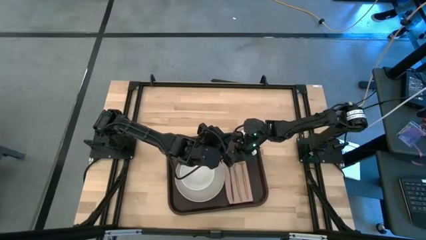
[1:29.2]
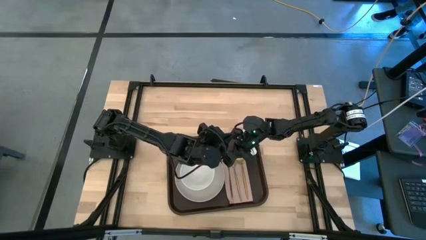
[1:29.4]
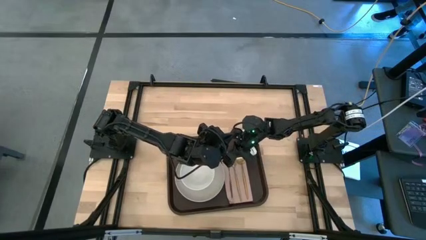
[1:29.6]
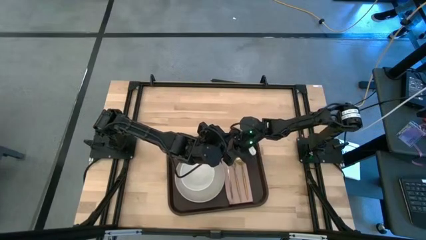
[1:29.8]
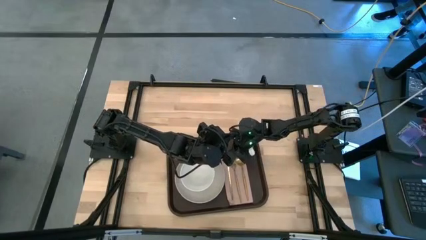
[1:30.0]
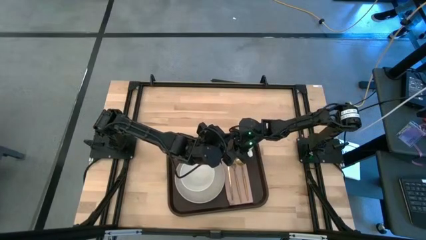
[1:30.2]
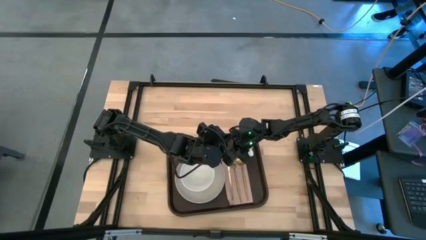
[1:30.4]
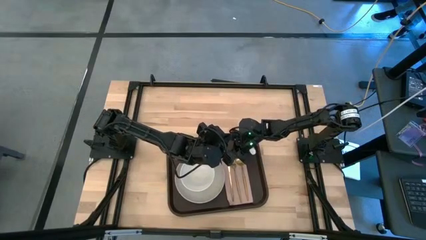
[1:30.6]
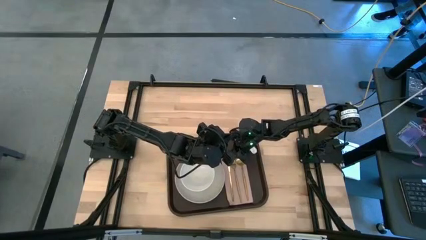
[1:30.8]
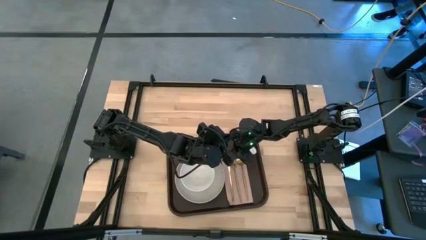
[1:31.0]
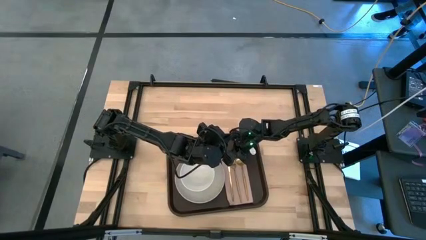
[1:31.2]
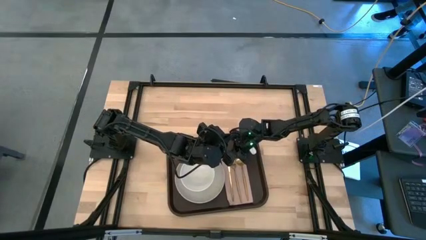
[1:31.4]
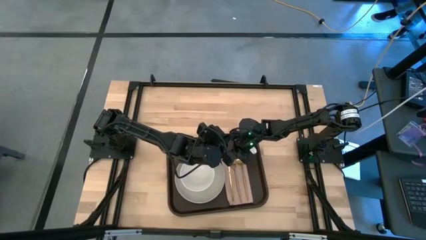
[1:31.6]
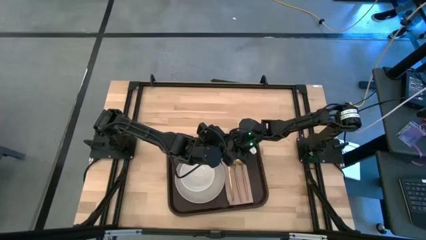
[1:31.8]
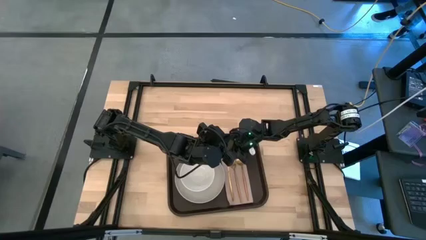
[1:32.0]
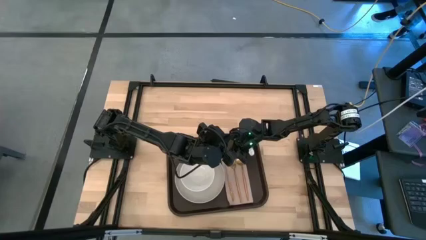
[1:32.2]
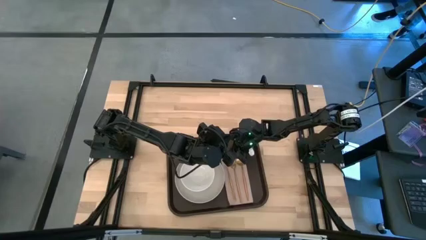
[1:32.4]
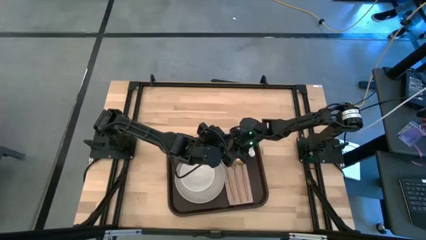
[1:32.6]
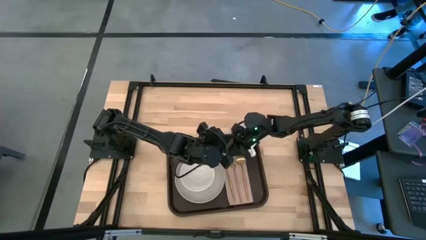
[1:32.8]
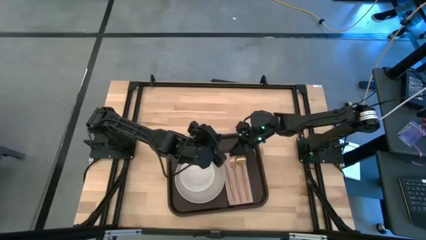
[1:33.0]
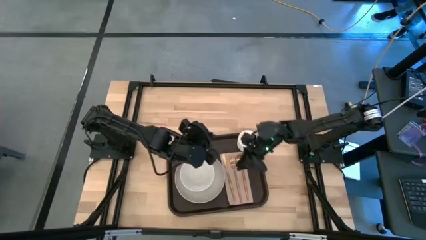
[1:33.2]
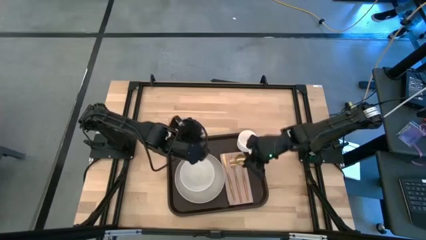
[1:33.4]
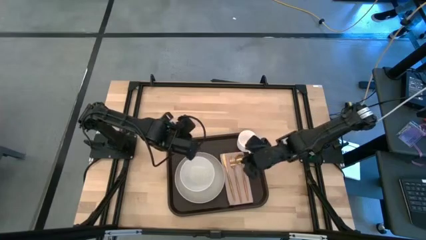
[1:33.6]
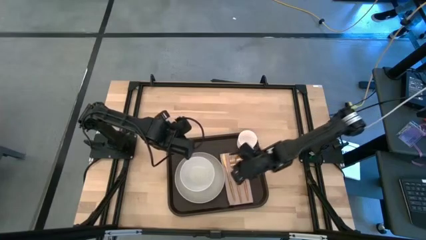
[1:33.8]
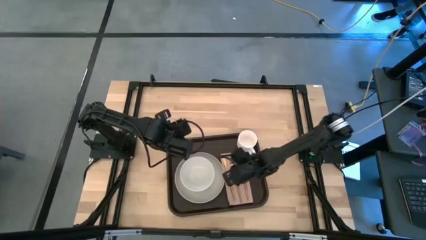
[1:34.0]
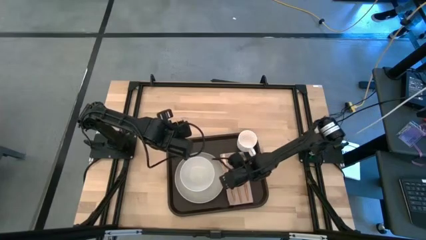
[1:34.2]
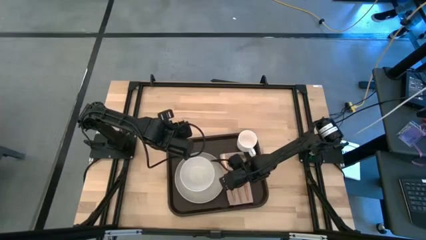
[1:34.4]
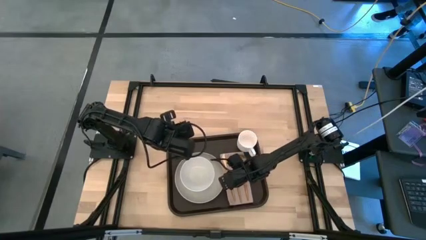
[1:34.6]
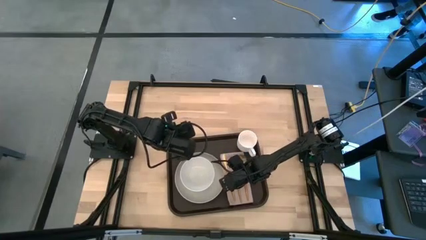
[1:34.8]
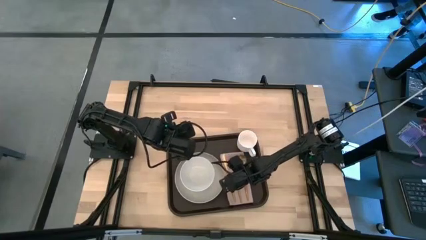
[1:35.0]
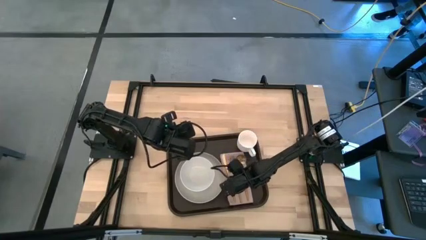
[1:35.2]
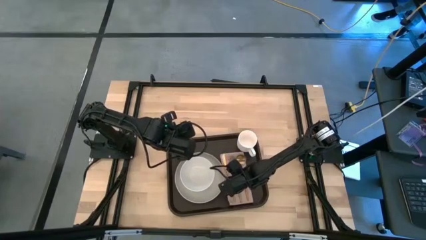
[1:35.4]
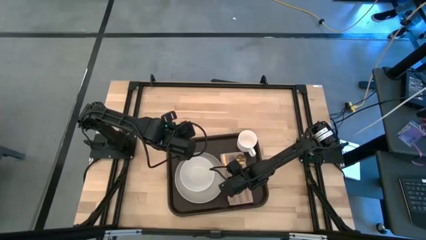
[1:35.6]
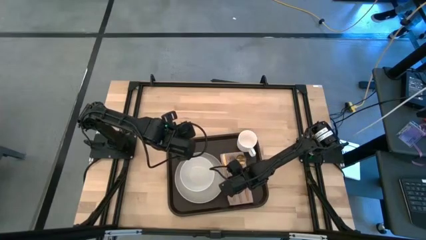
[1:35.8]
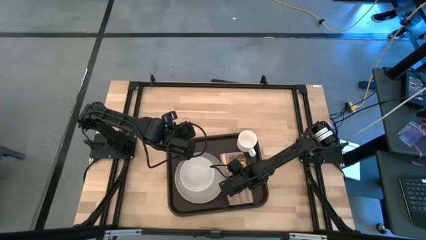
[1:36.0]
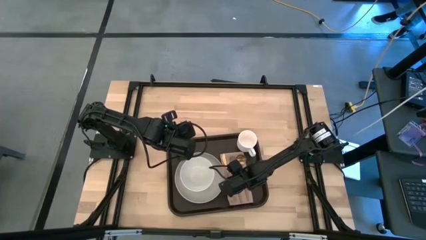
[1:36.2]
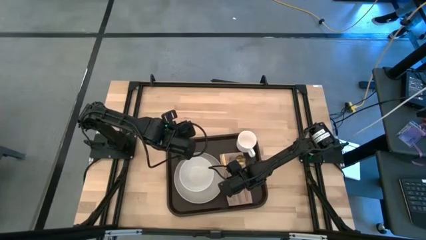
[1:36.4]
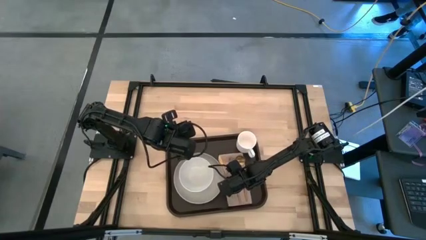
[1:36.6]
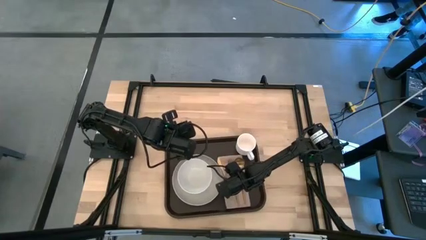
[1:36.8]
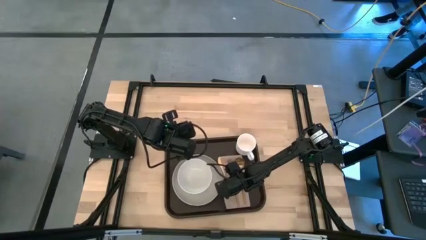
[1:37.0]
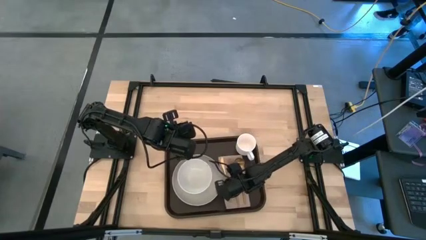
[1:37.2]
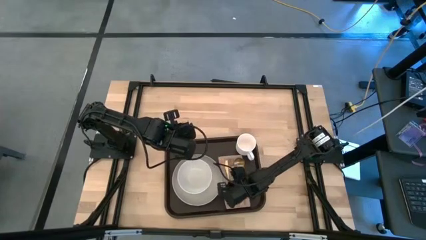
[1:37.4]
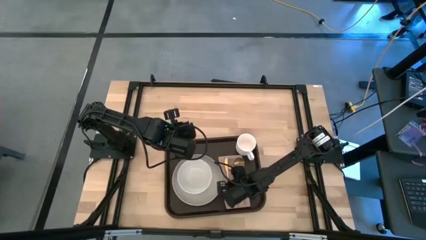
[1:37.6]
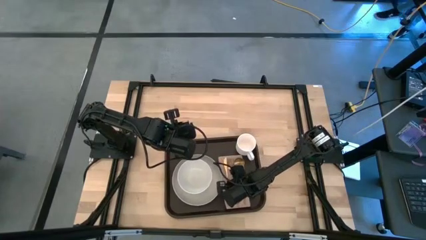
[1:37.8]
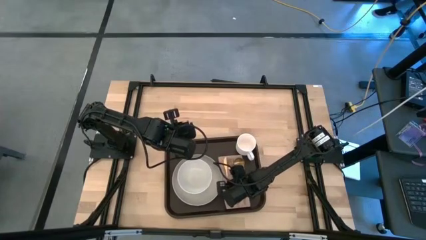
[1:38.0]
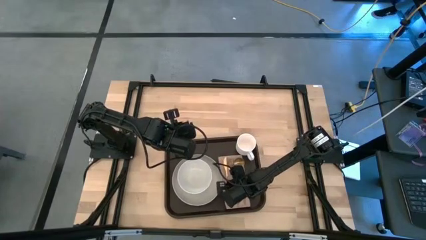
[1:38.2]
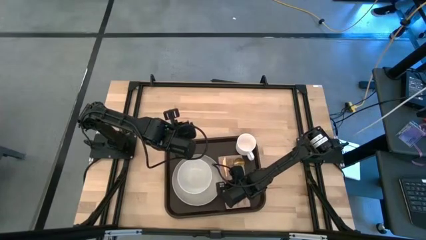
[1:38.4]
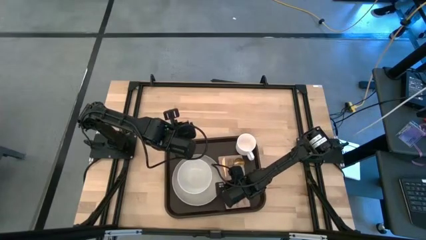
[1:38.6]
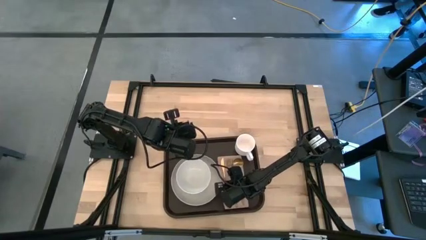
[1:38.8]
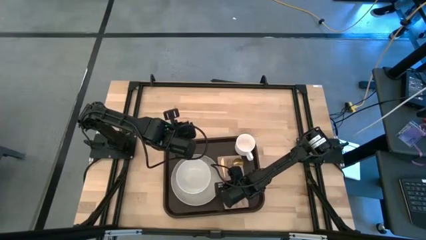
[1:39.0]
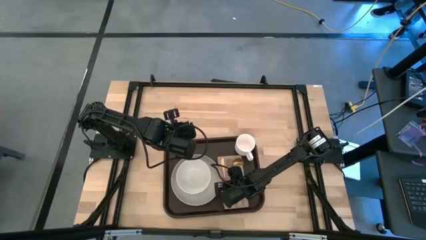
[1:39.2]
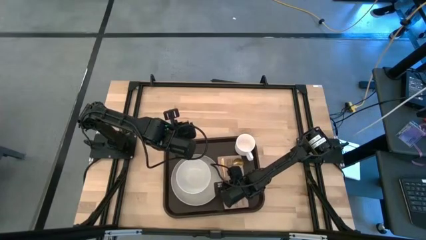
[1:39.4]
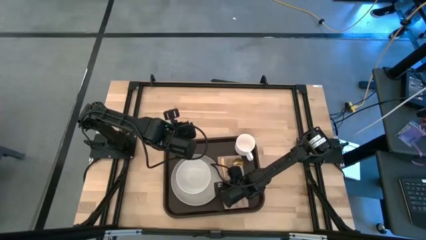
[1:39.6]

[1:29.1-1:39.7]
Task: Set up tray
Put the golden knife to the left of the golden fork on the brown serving tray

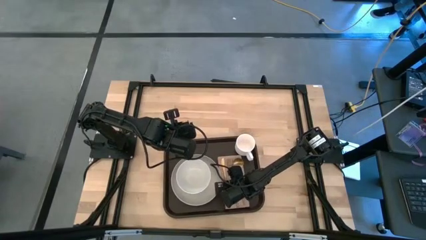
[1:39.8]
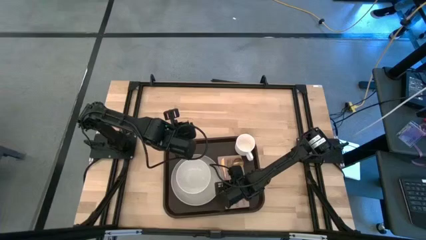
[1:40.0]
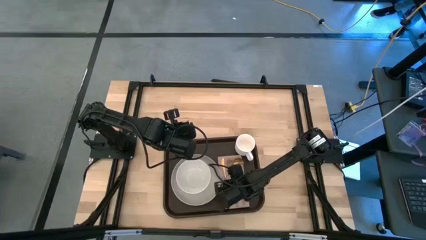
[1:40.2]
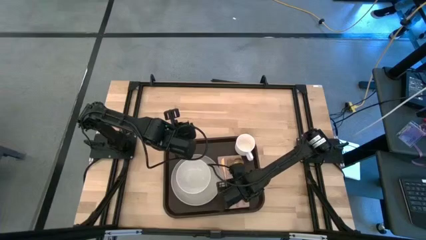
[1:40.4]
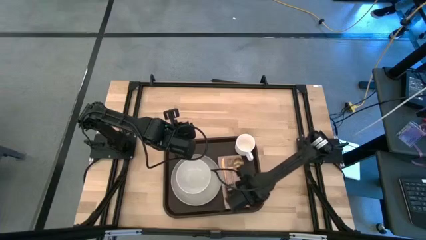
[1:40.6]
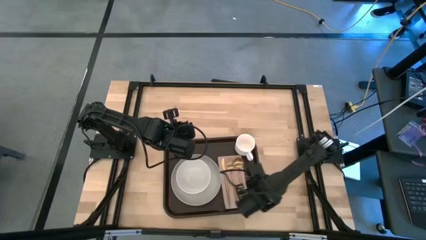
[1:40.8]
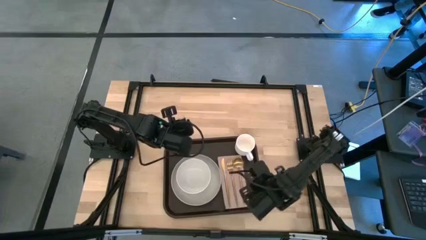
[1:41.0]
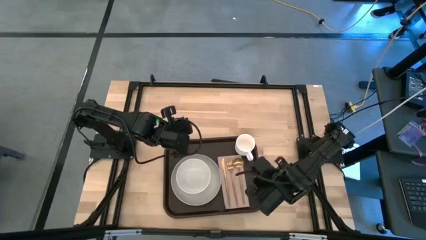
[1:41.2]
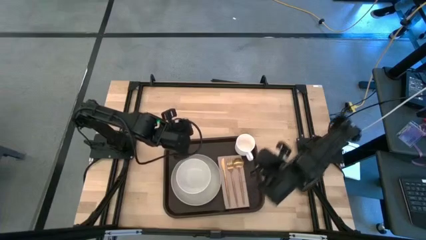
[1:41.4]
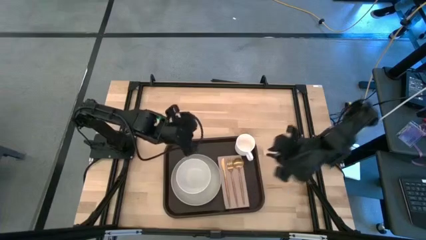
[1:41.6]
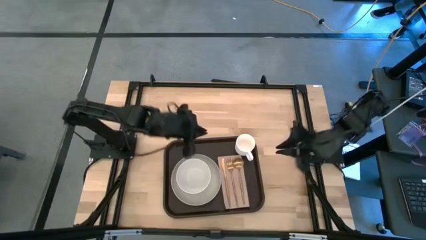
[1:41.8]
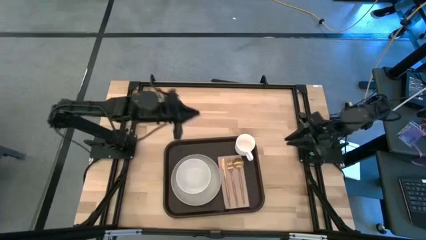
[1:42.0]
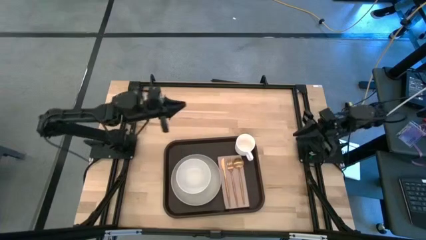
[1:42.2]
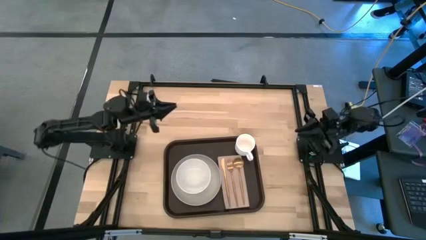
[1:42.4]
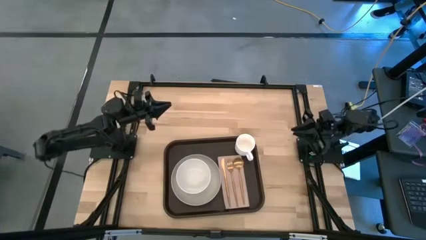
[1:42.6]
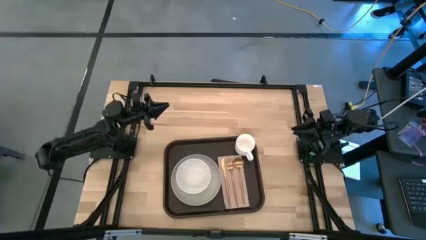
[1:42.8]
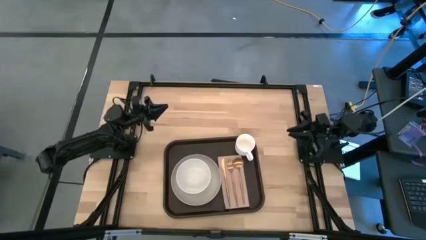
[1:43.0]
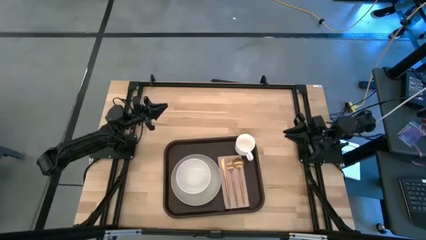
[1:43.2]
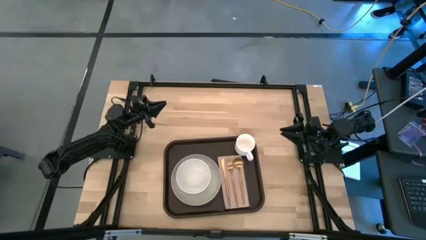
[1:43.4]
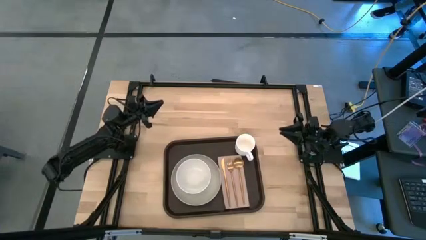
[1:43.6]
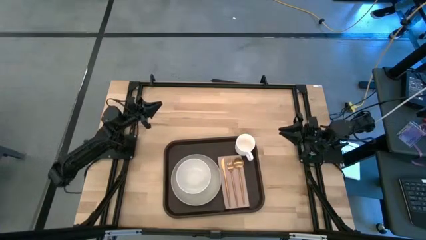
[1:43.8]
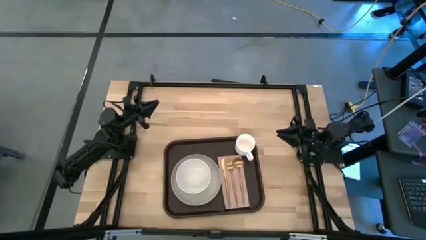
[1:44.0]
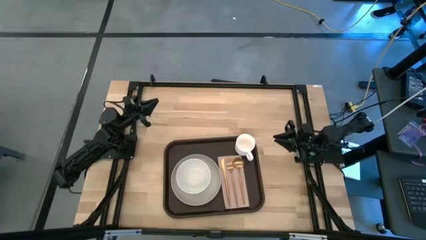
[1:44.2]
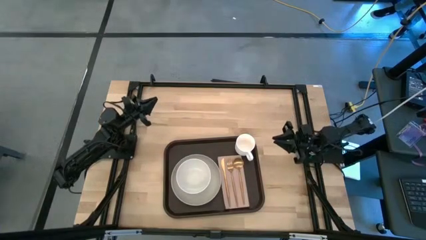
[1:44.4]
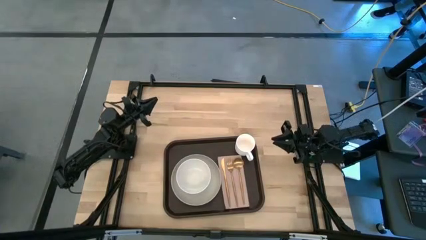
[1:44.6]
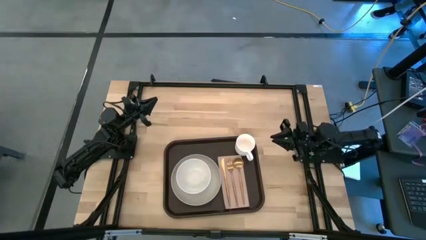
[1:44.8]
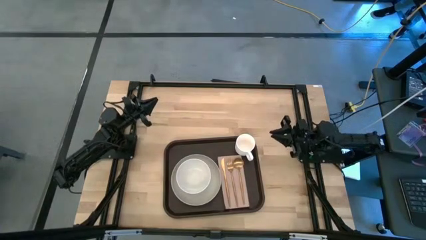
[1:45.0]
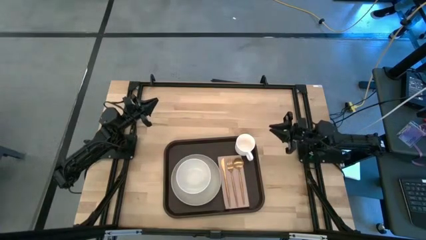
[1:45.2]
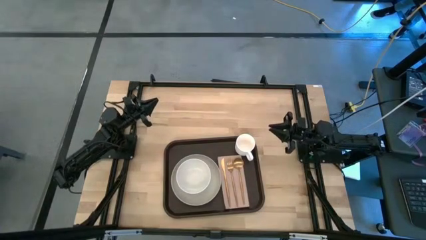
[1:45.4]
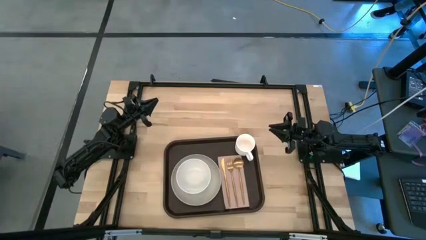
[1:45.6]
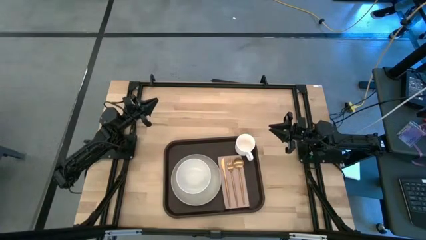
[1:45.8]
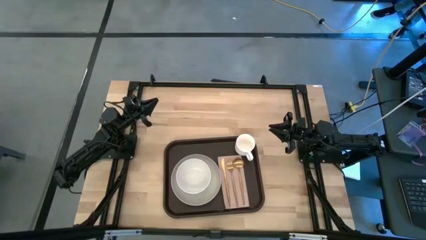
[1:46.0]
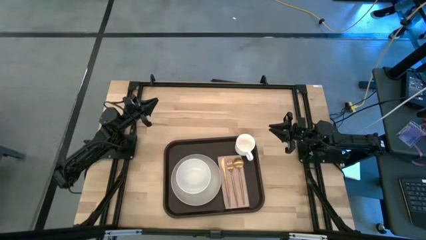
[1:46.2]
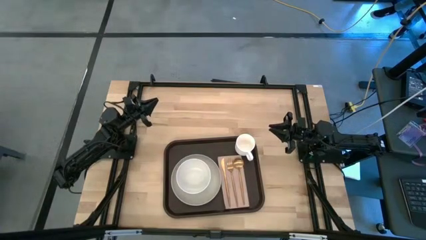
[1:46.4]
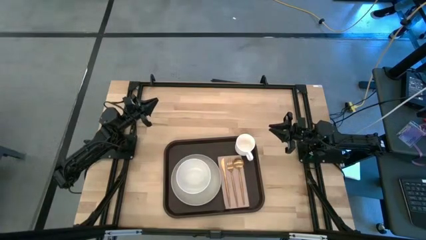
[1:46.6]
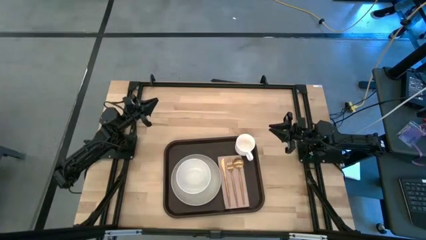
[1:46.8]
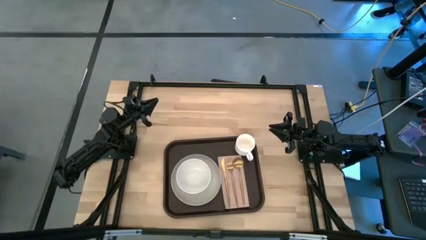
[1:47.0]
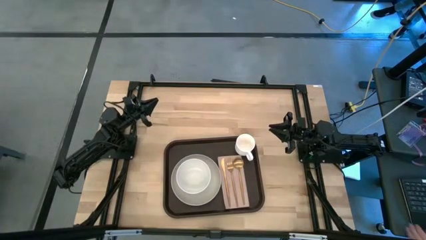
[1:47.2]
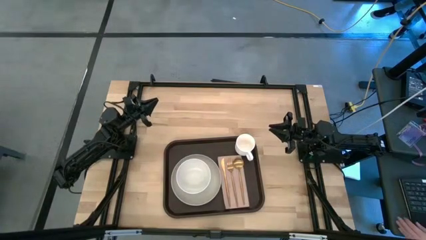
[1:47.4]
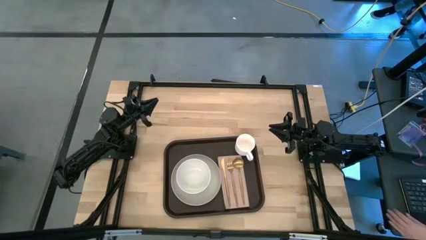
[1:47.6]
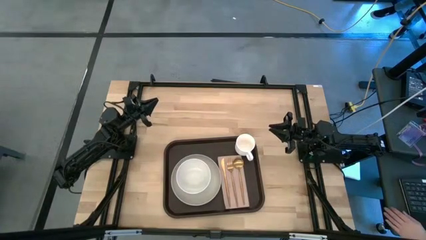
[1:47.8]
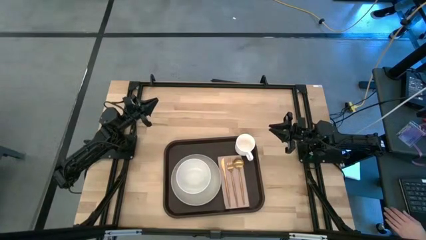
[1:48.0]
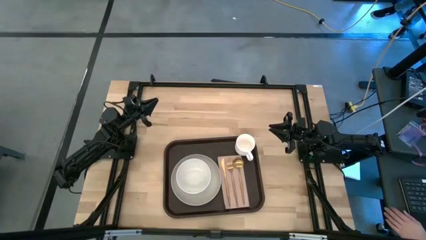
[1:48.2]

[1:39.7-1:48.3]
Return to Home Position
